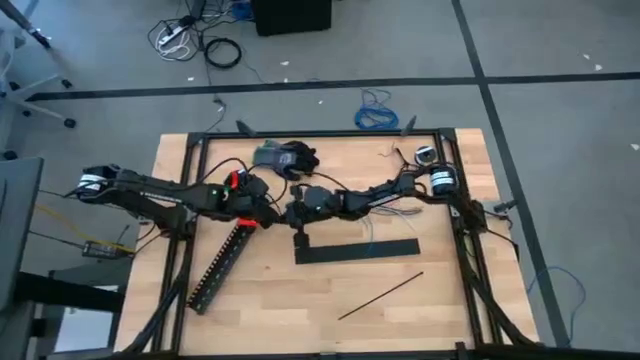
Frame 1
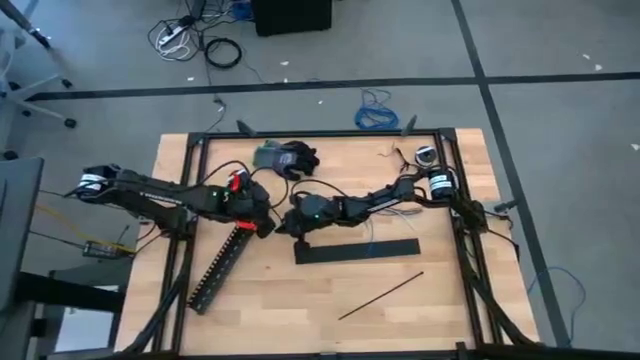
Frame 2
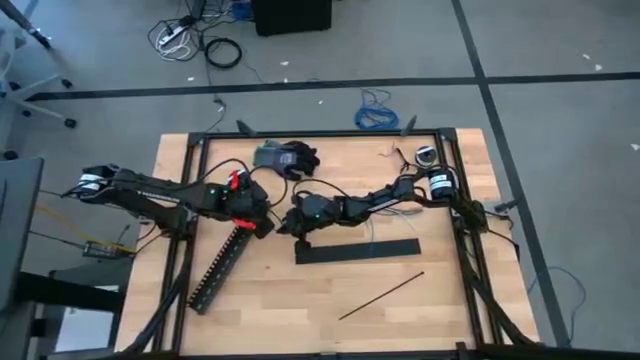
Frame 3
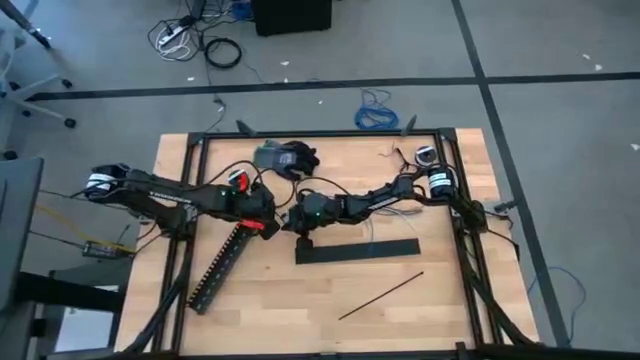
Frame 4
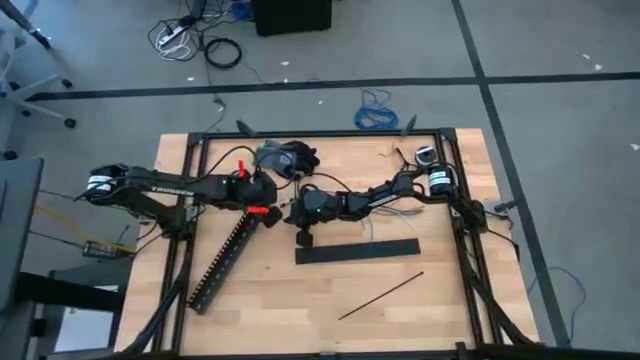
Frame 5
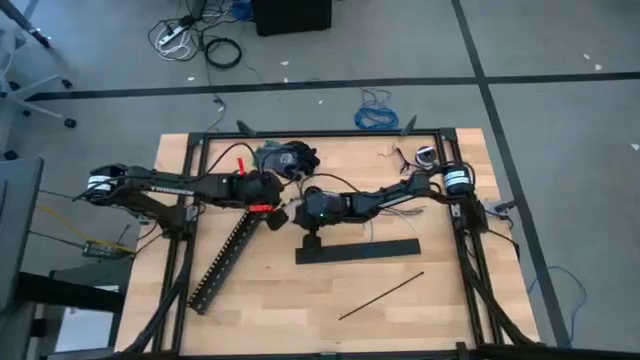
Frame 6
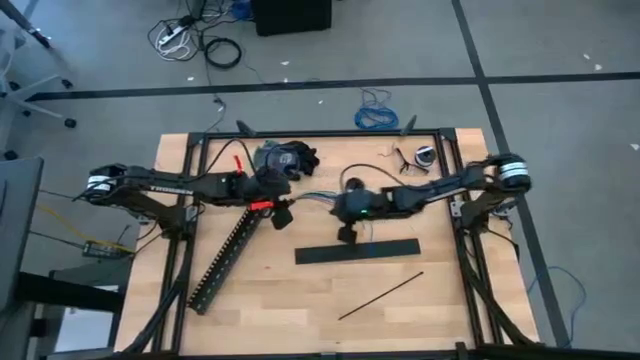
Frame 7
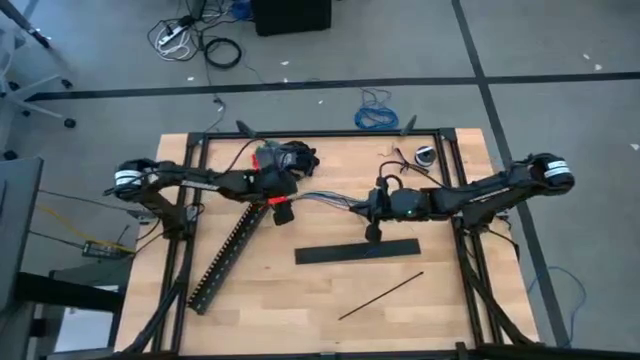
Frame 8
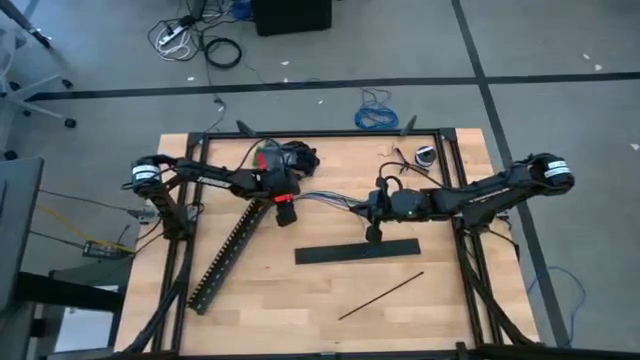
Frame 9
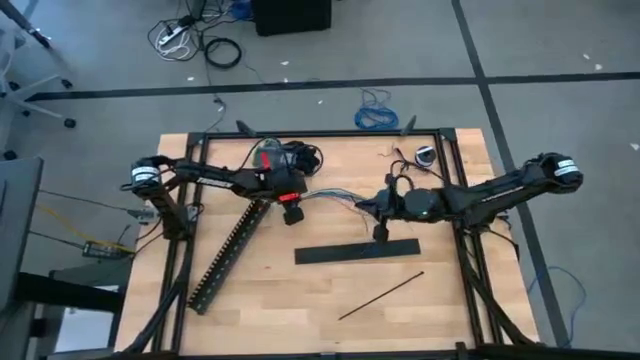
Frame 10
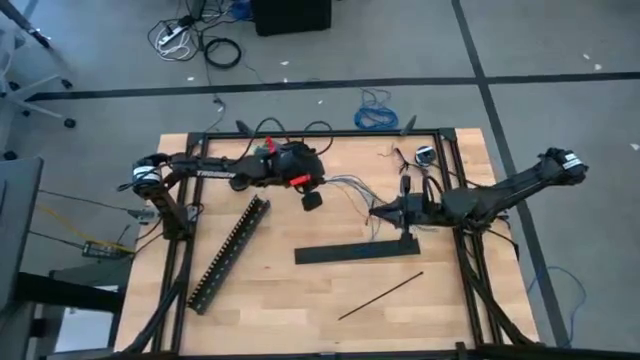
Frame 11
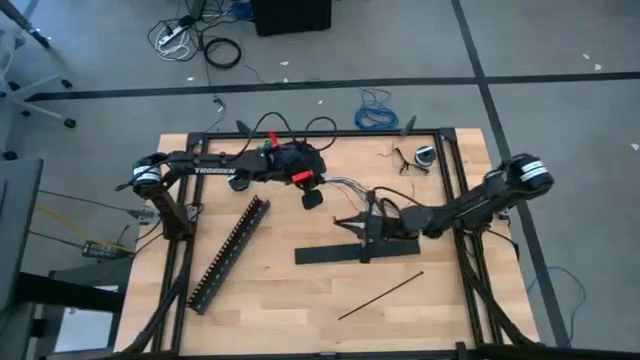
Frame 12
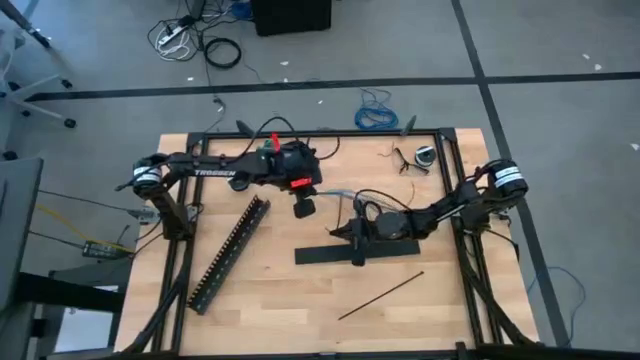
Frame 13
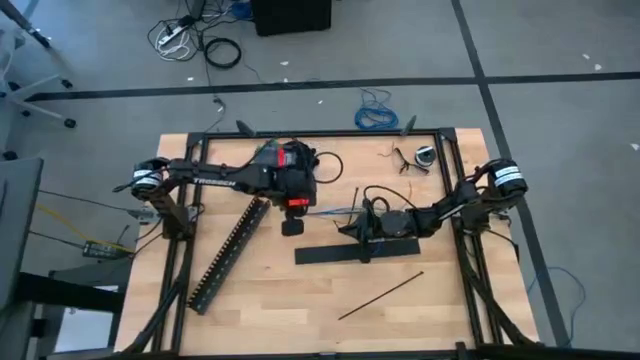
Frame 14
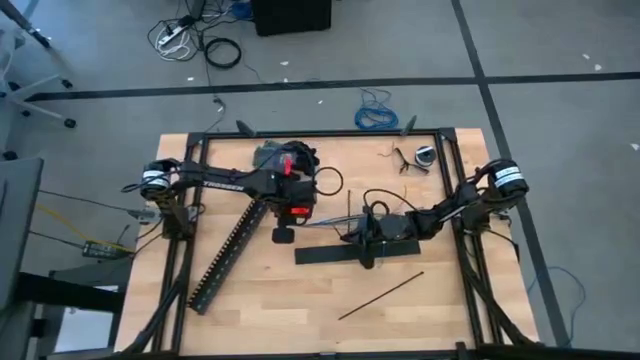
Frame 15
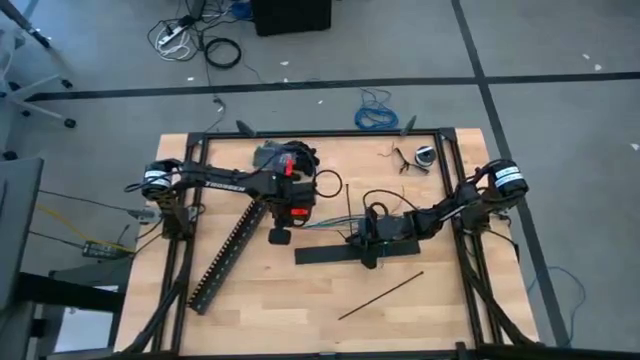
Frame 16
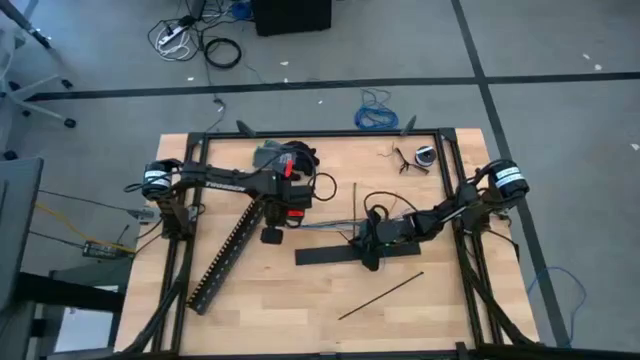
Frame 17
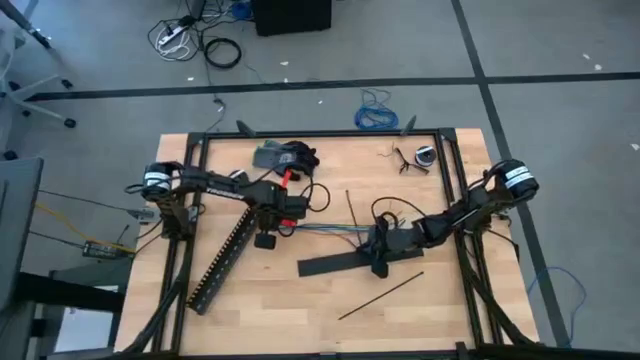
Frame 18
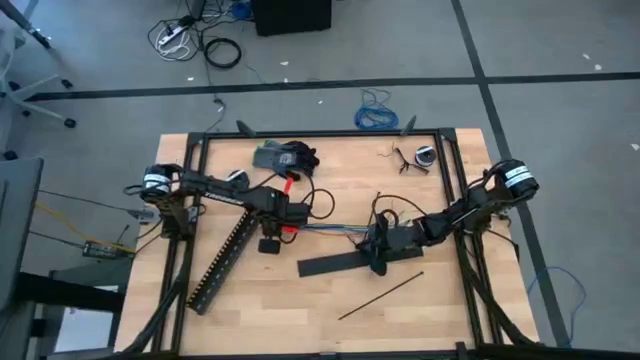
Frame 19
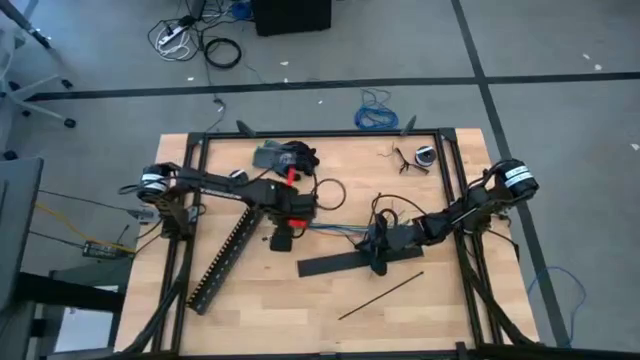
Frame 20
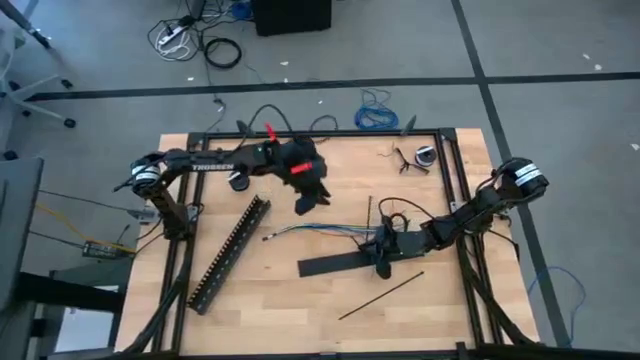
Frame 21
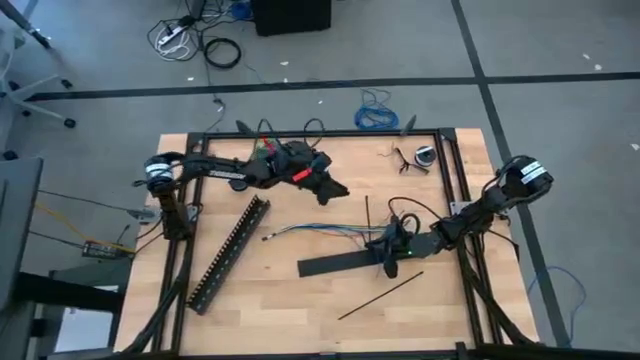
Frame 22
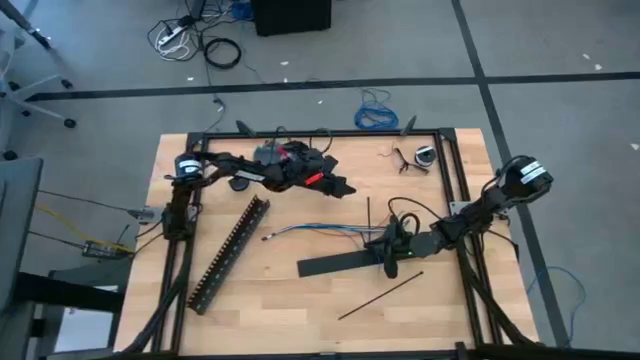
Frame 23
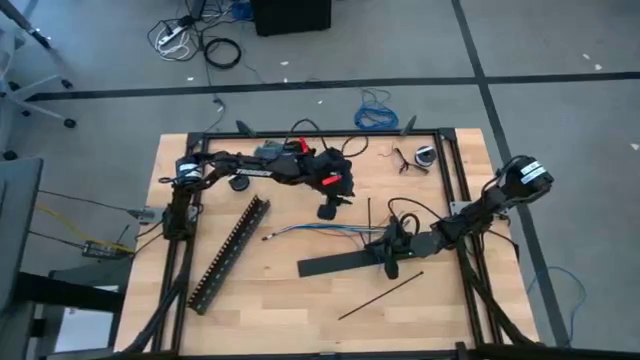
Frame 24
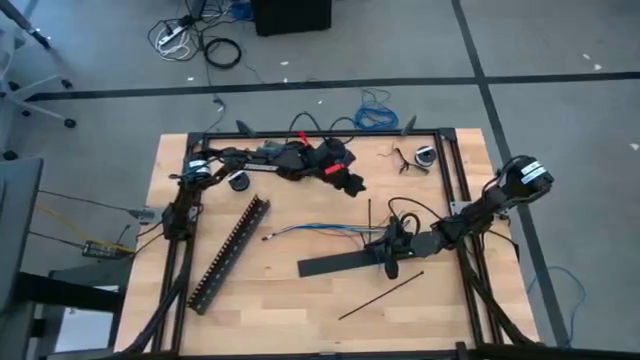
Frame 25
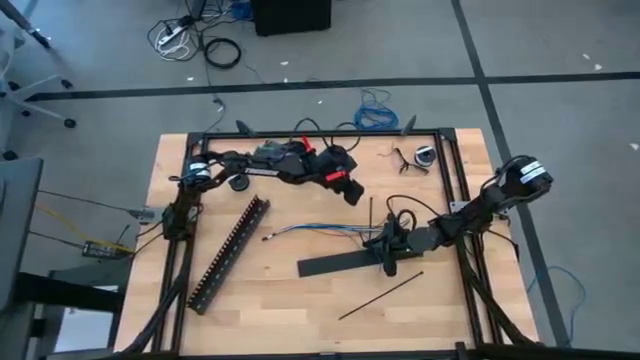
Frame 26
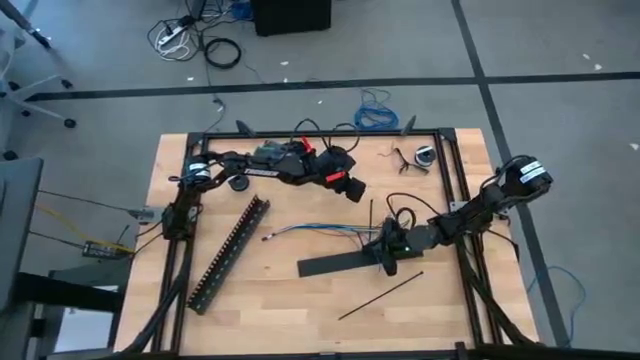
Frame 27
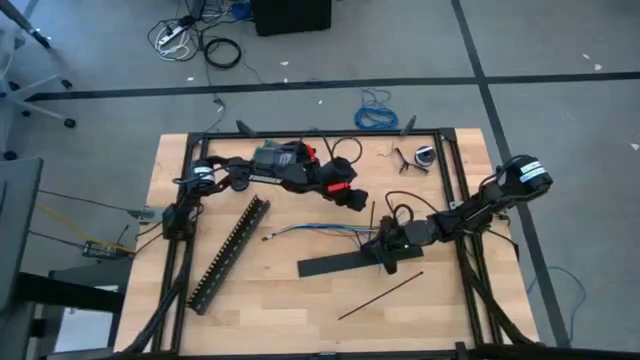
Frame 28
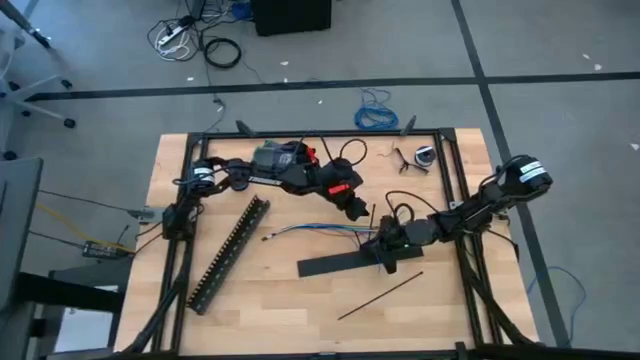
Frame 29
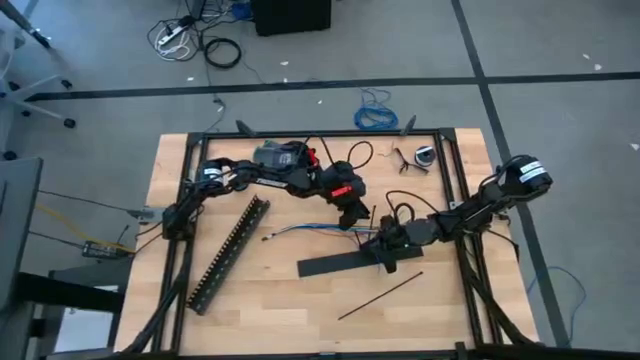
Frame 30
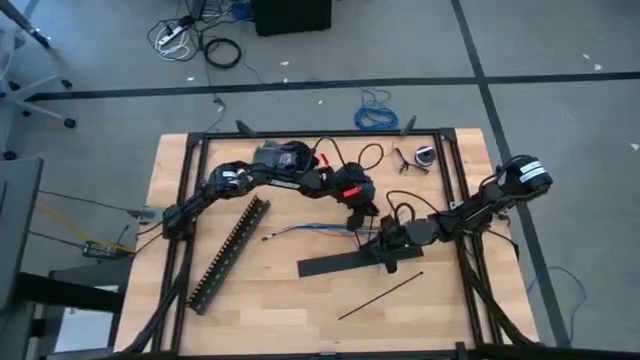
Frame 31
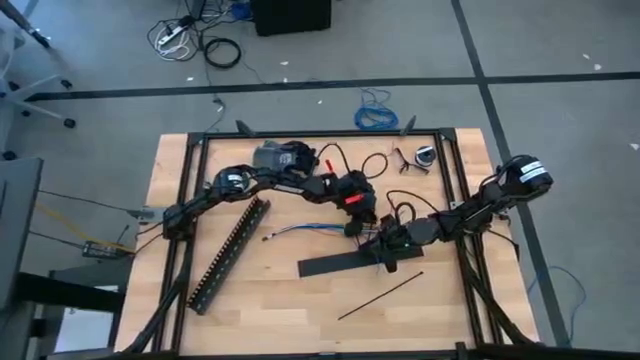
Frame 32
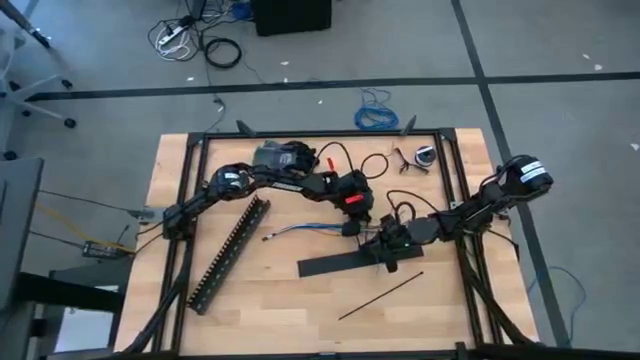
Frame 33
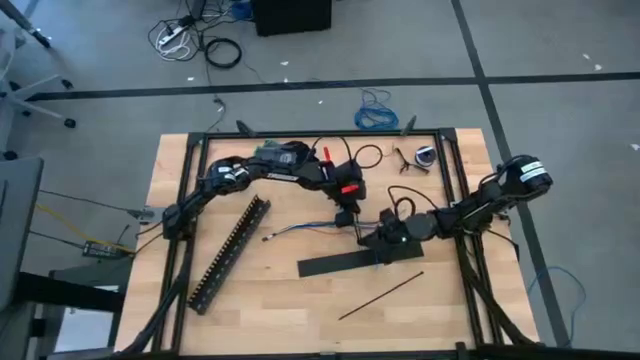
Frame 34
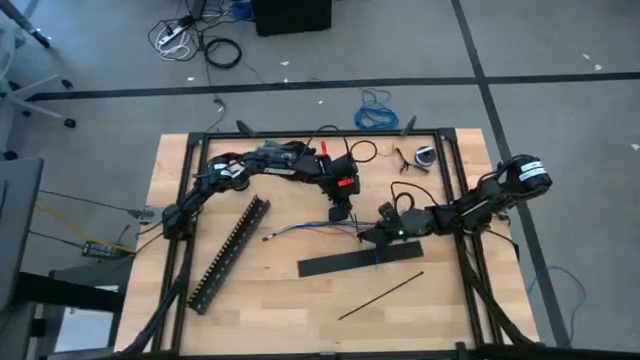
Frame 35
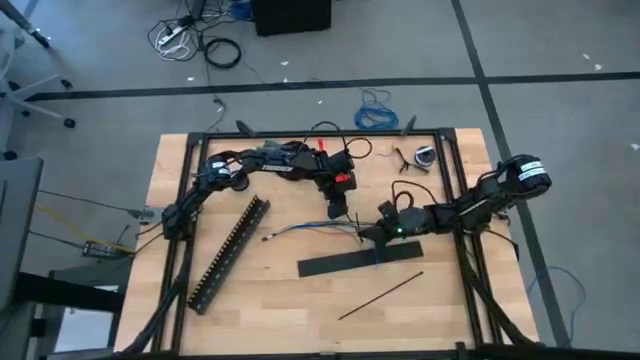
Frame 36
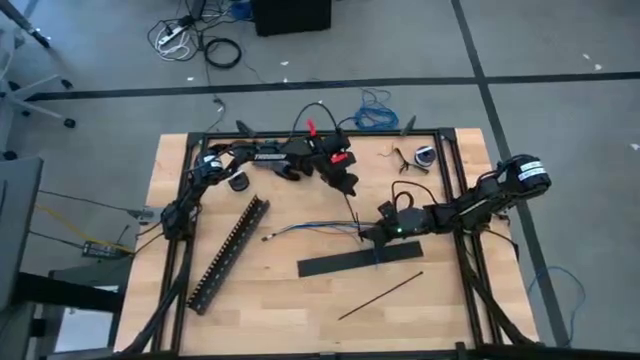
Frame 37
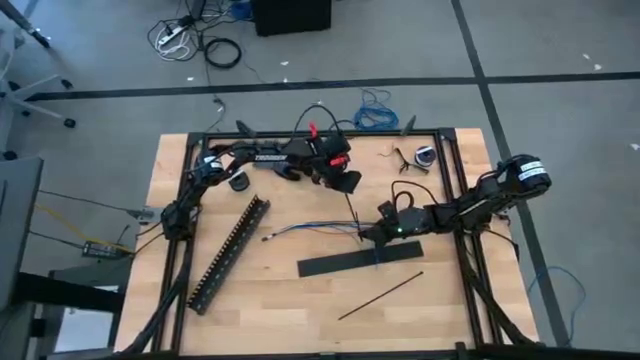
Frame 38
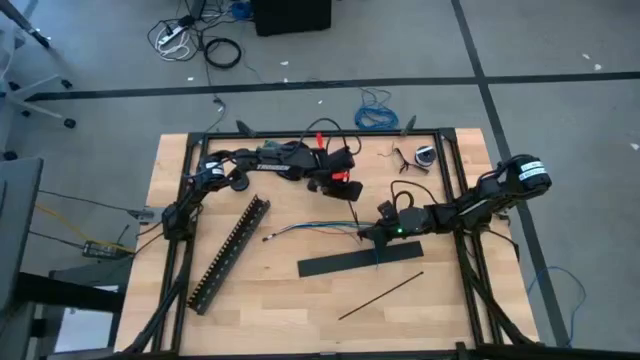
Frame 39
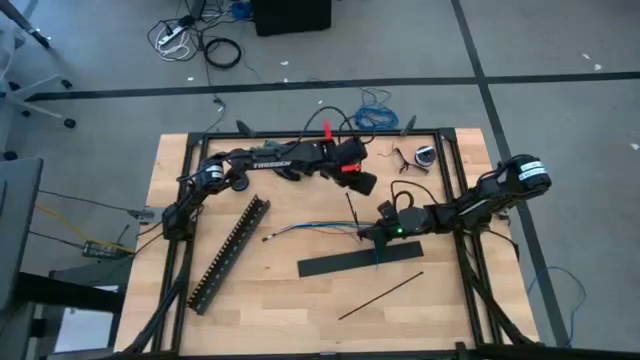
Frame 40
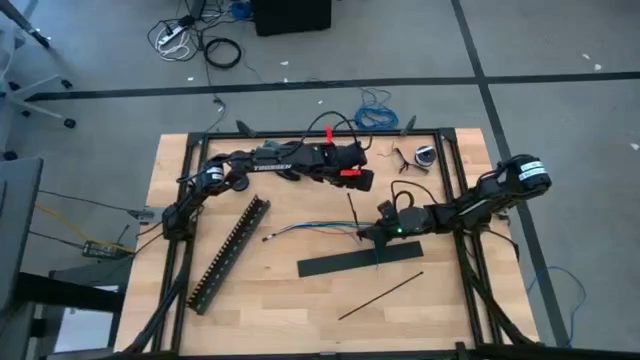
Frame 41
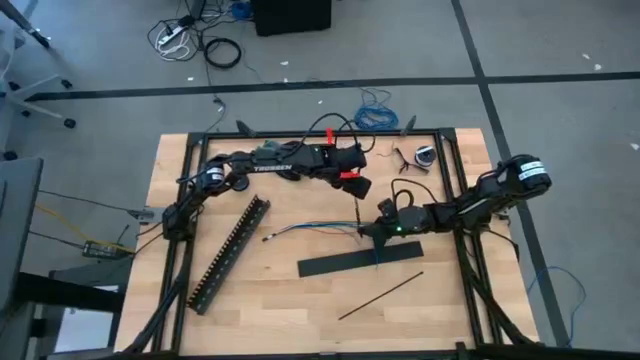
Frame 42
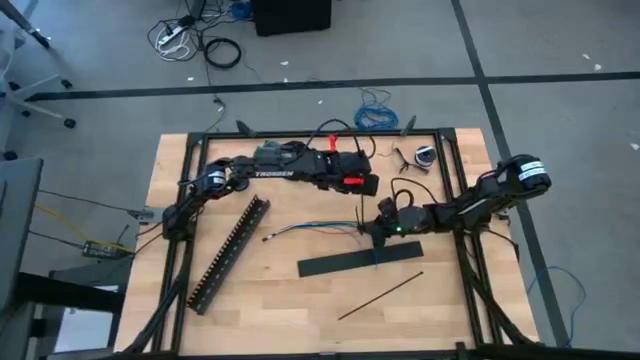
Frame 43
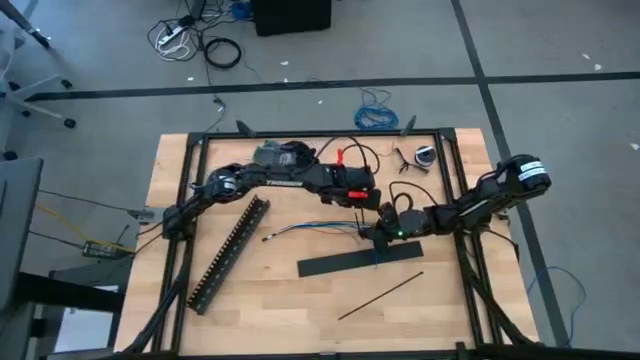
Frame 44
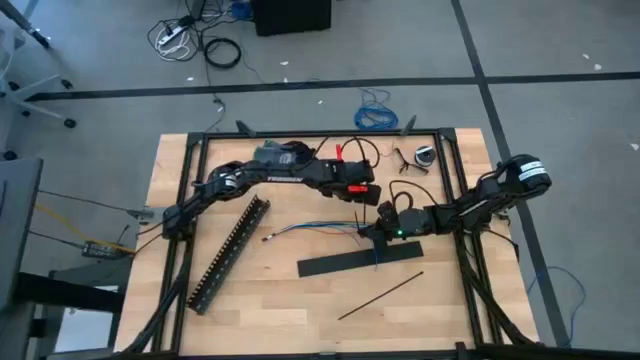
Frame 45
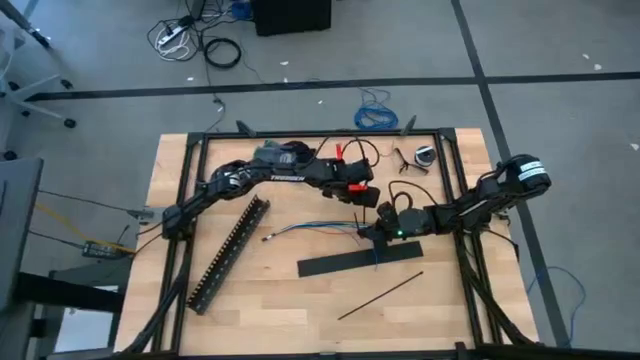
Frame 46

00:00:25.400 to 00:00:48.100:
Task: Ziptie cables
Wrap the black zip tie on the cable wires
